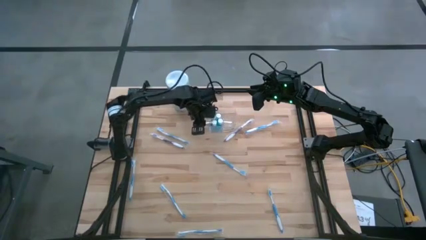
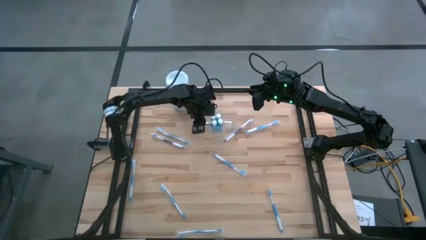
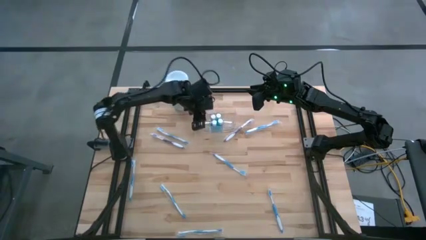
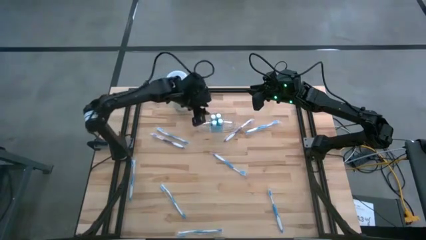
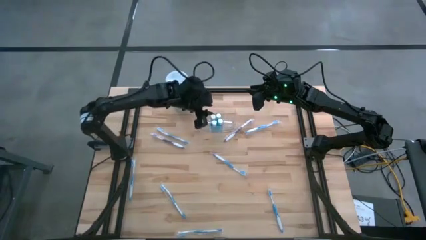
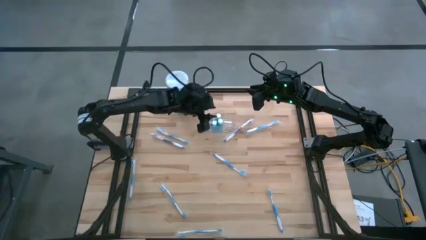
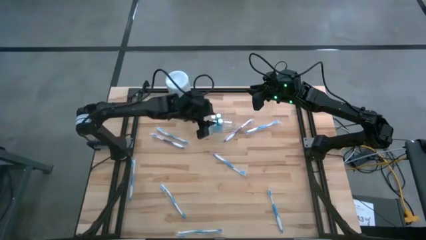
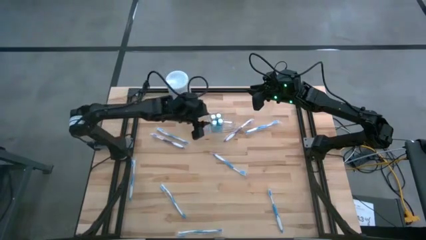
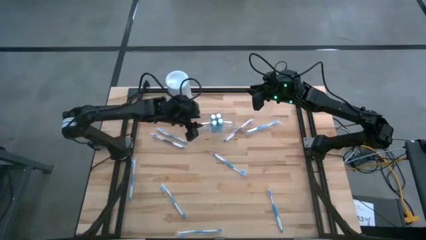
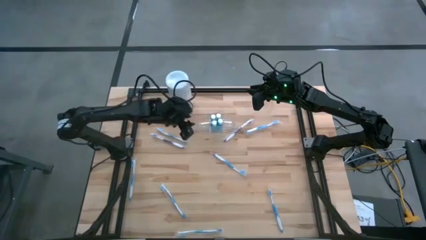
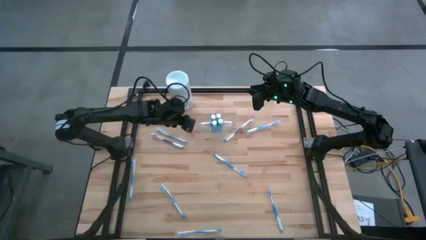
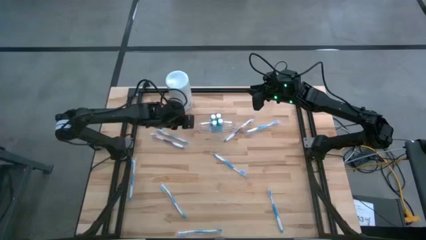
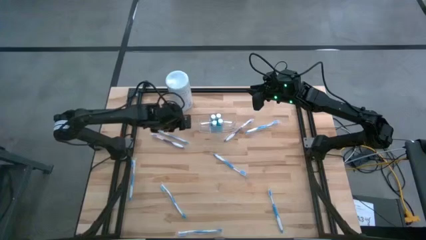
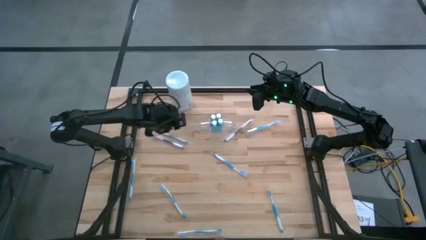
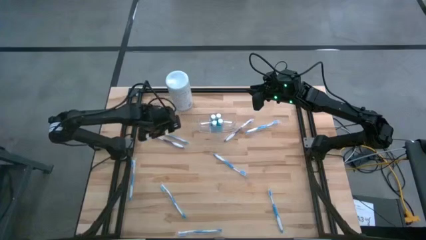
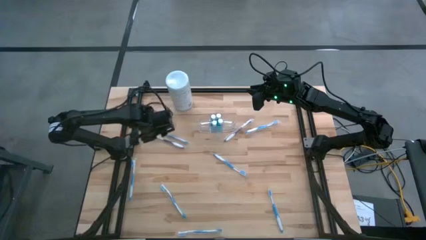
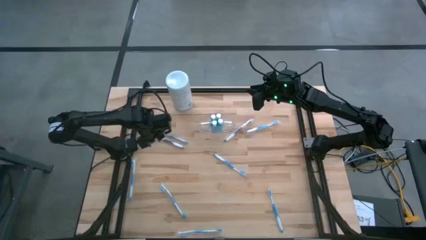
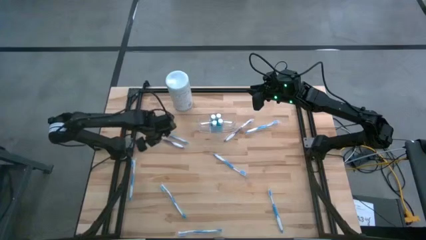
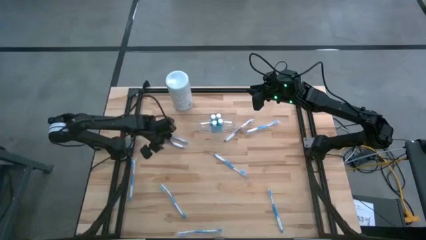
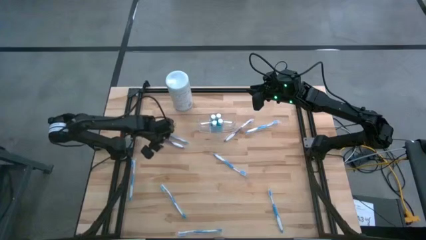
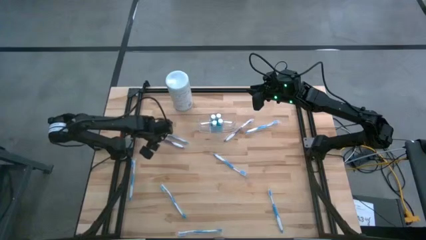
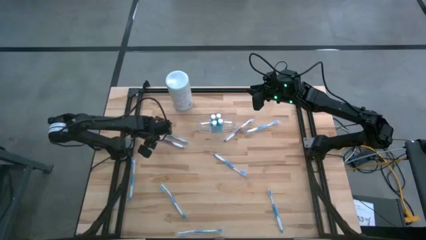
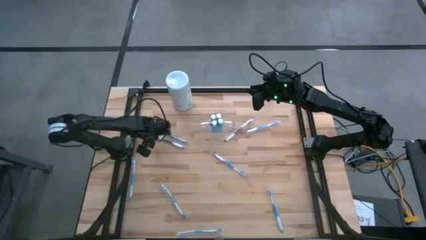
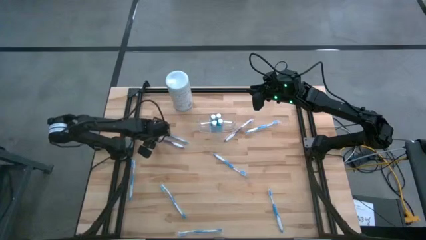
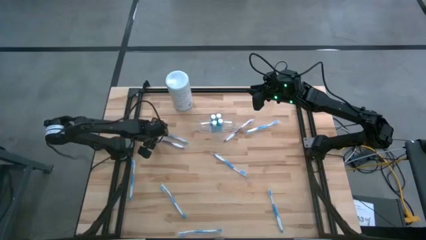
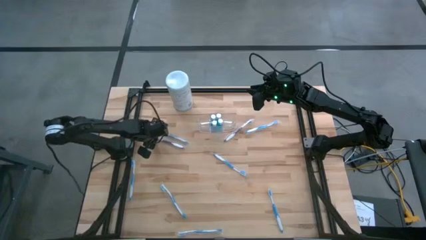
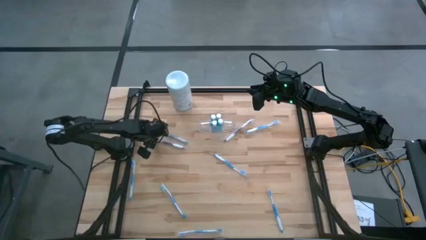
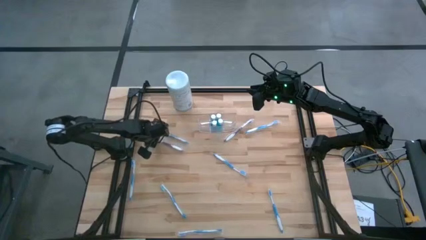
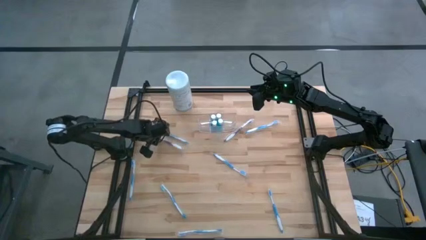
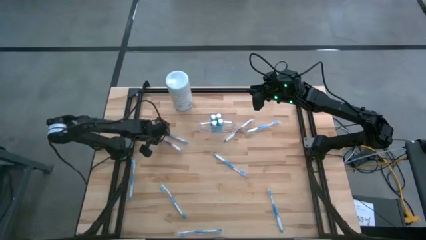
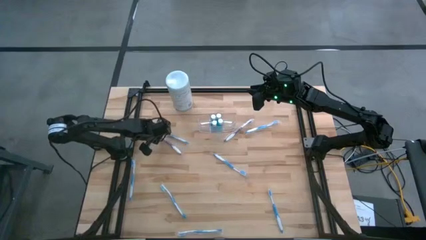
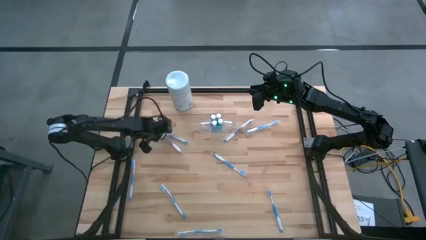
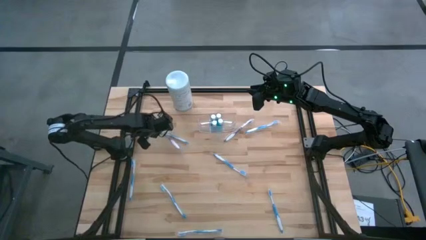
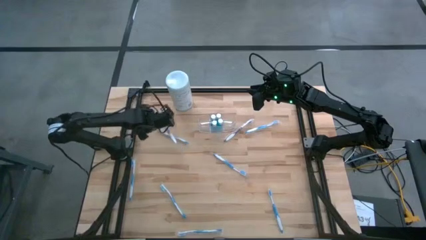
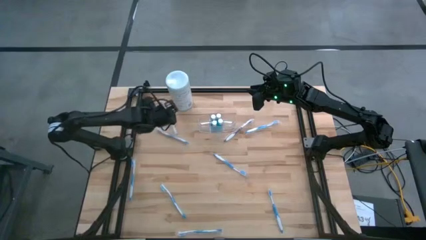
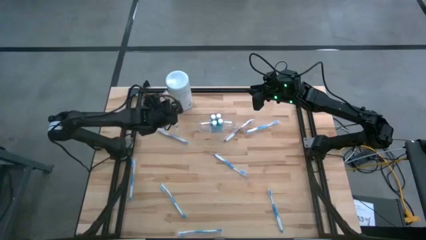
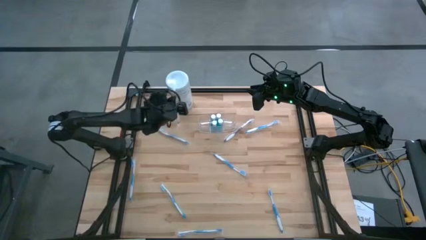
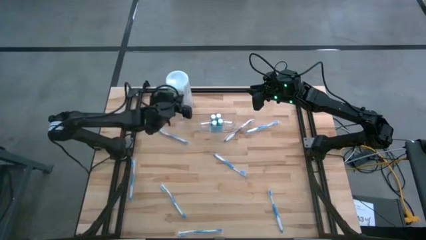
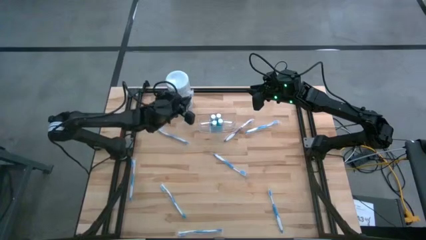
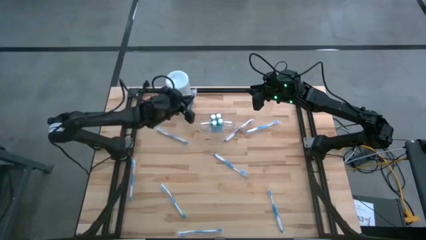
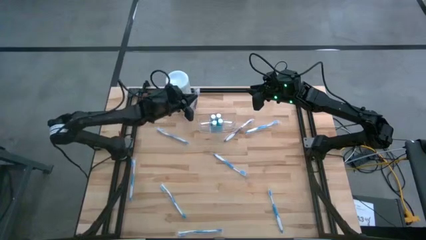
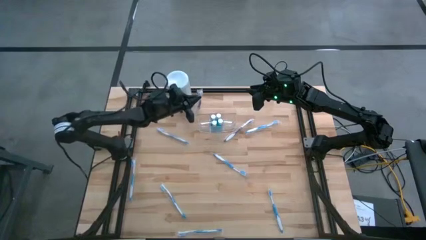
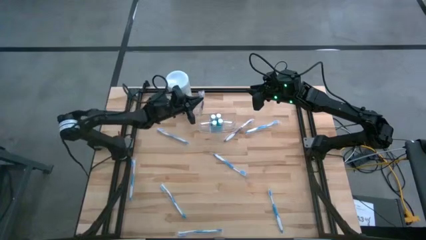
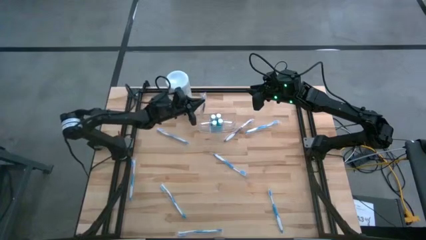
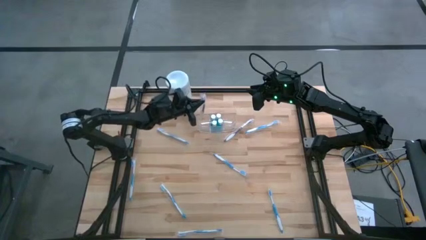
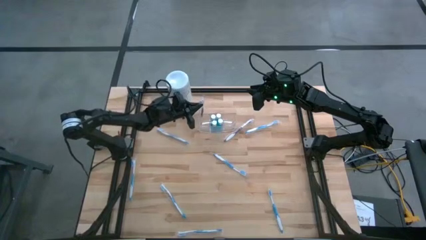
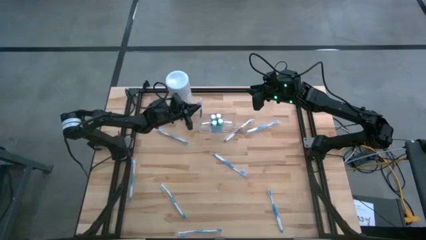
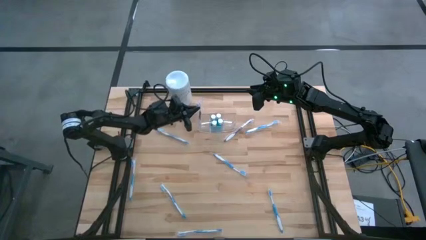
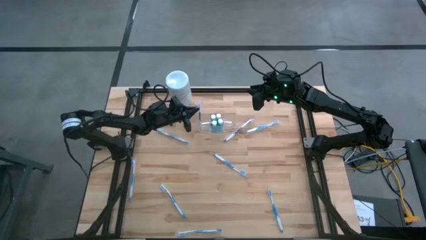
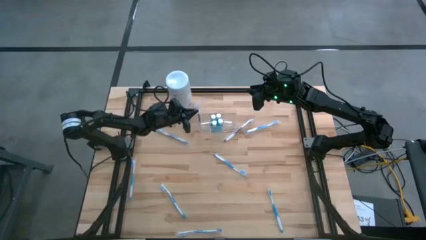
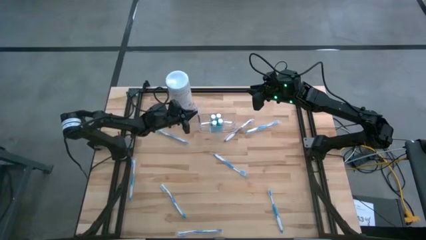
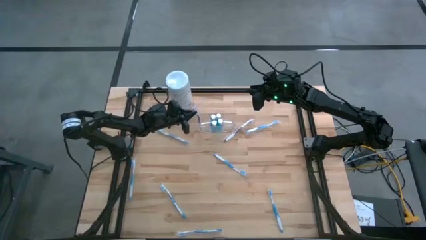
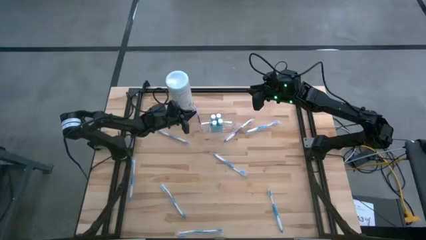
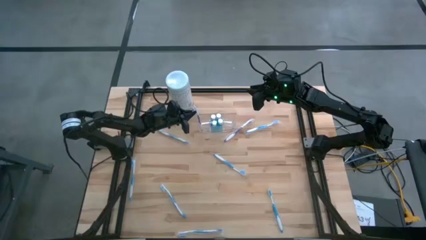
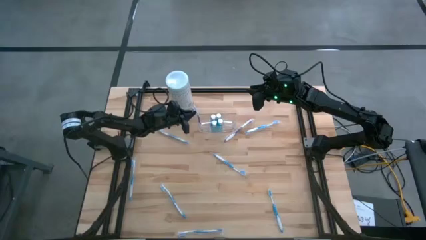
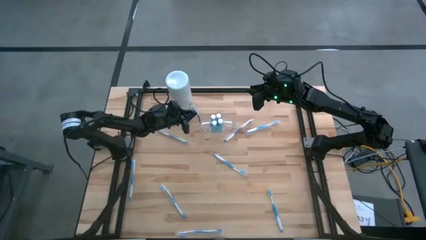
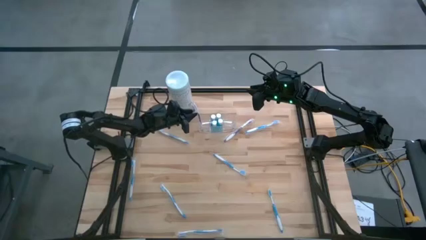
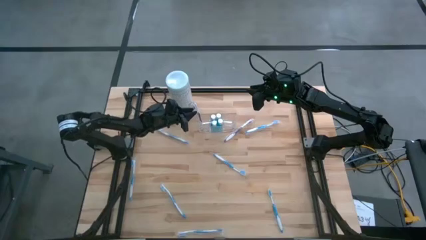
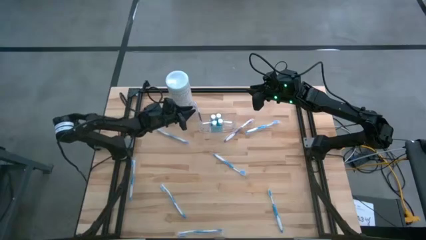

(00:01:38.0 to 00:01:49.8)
Task: Pick & Place toothbrushing station
Put the violet toothbrush into the left of the transparent organizer

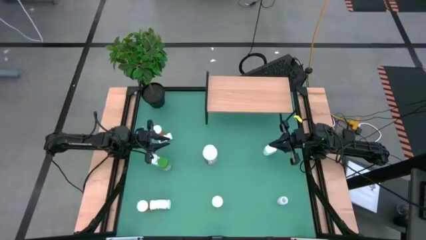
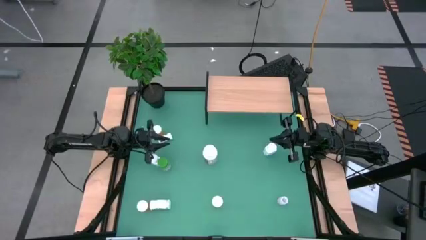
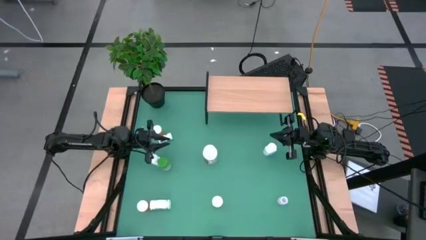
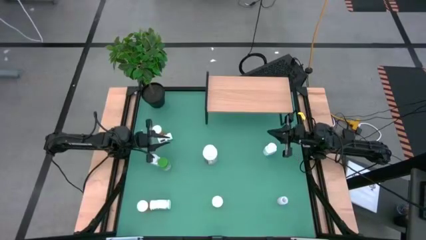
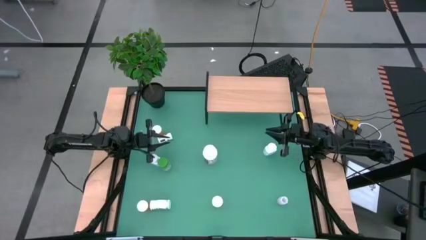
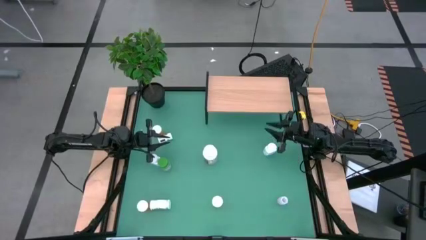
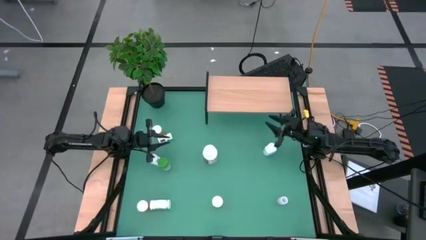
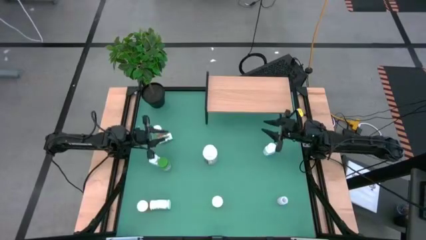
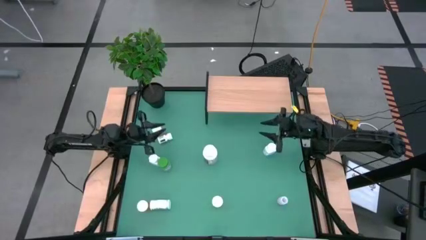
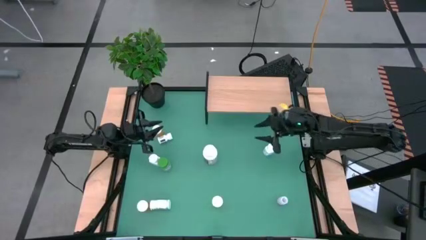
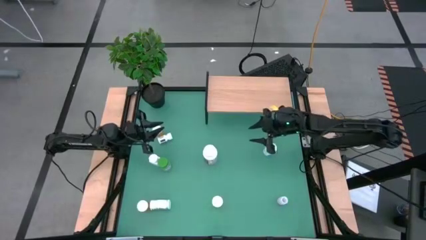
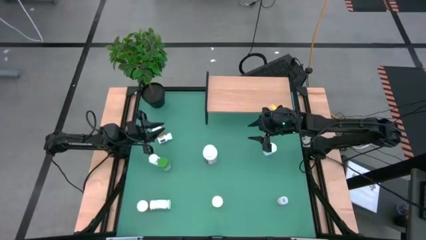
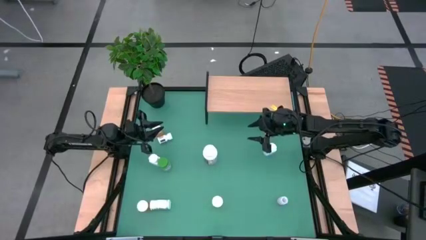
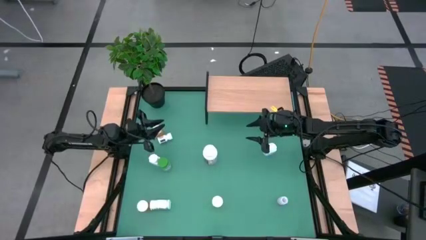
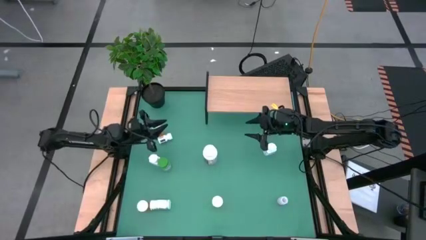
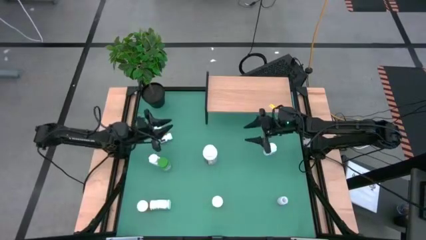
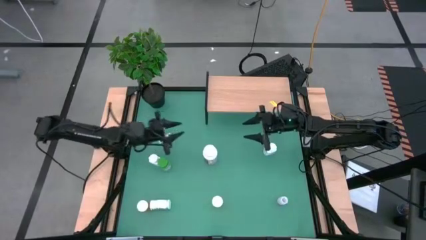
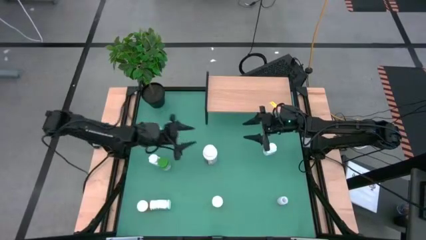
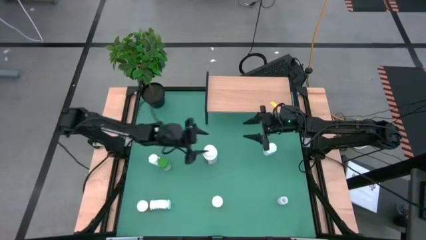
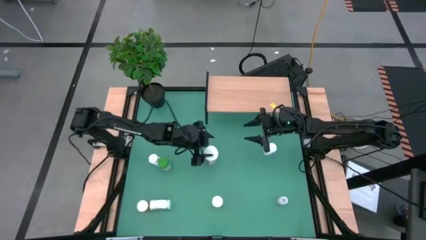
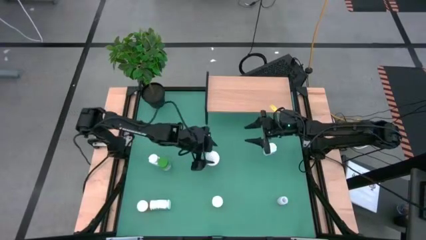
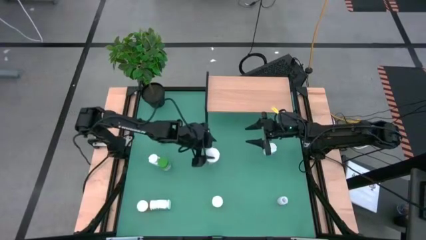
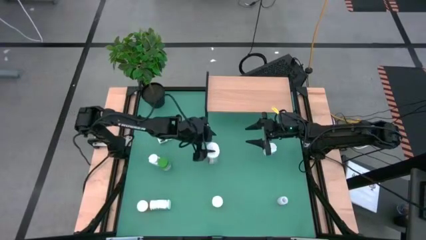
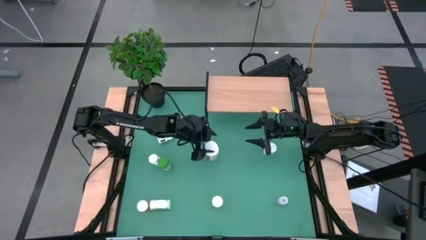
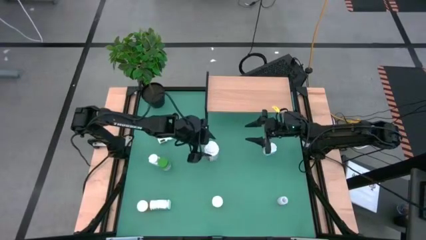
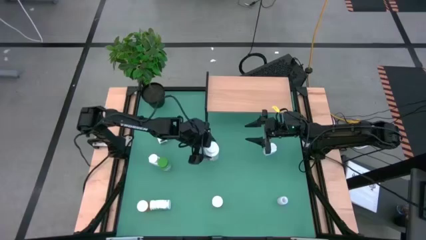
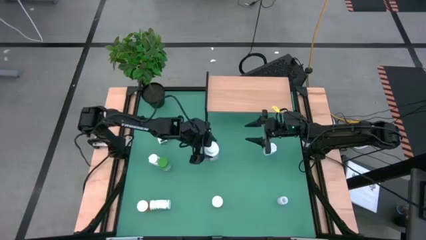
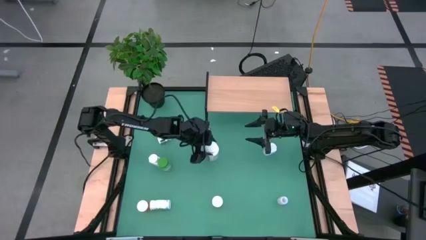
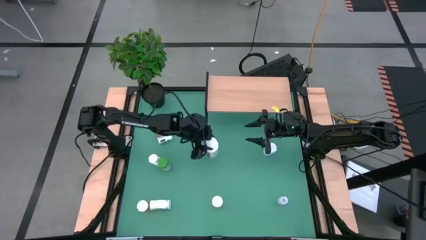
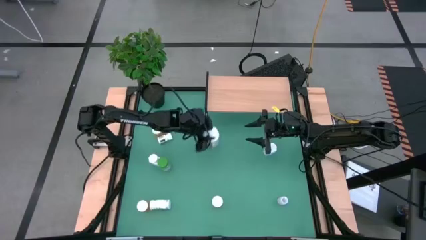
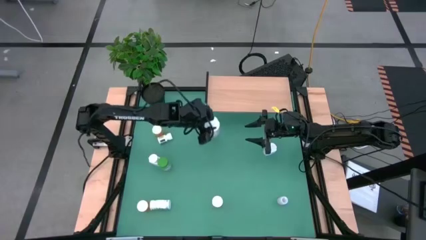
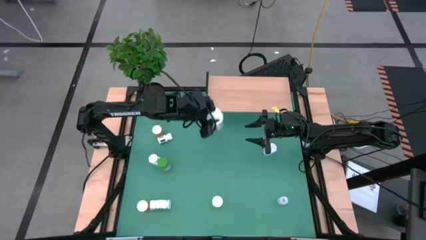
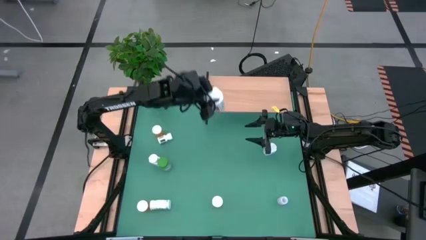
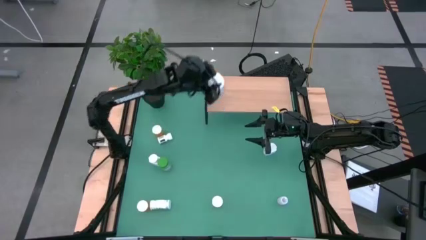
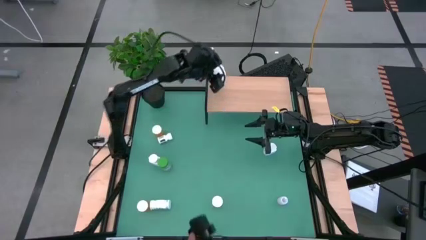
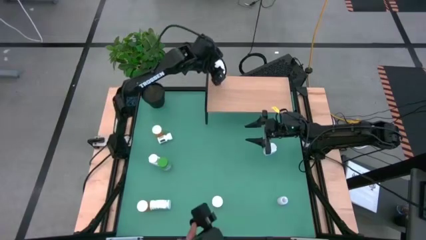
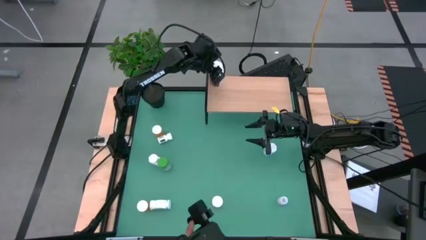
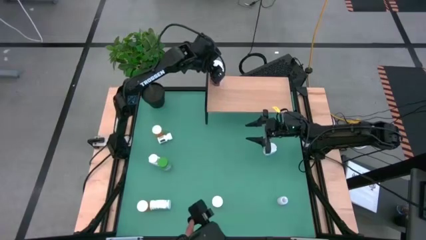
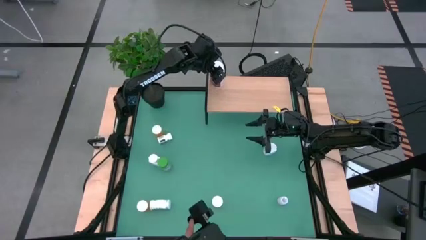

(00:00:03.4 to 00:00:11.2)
Task: Pick and place medicine bottles onto shelf by color
Put the white red medicine bottle on the shelf
